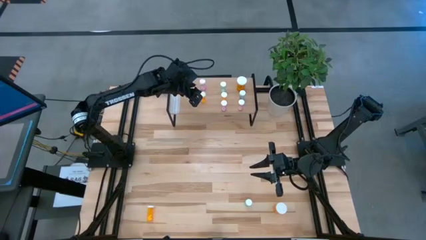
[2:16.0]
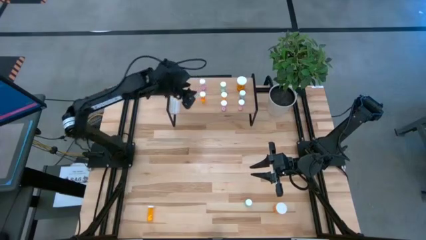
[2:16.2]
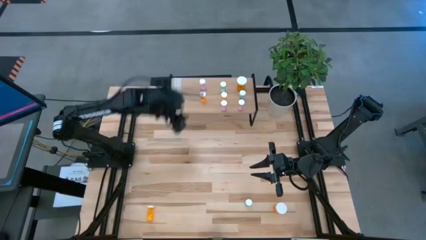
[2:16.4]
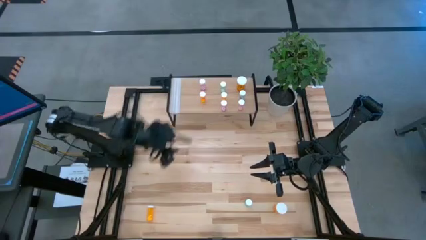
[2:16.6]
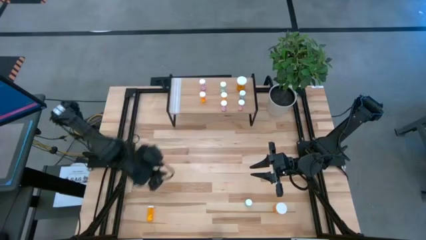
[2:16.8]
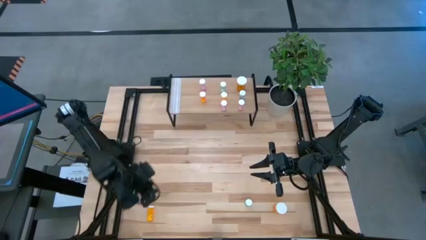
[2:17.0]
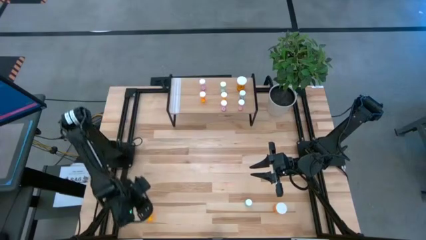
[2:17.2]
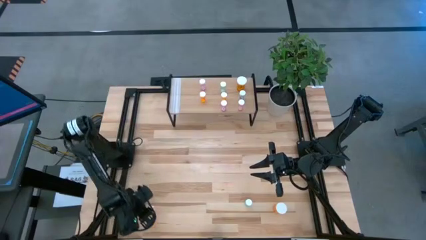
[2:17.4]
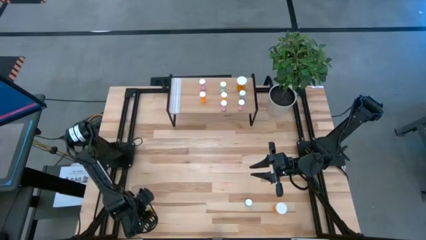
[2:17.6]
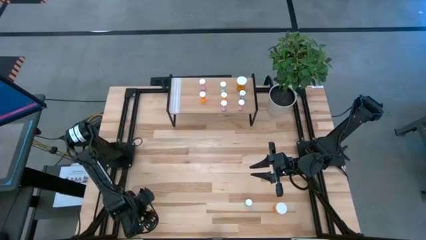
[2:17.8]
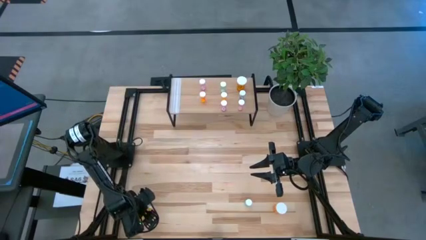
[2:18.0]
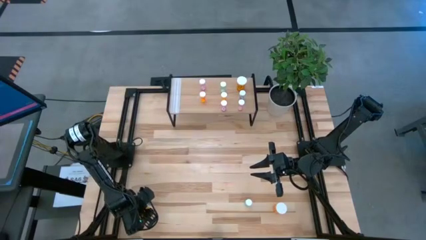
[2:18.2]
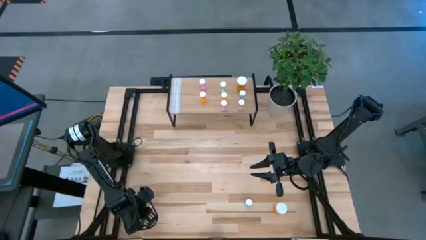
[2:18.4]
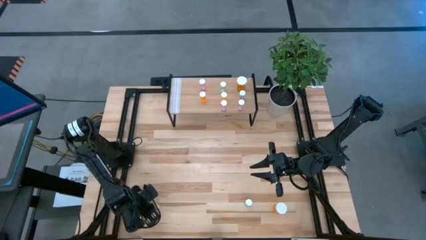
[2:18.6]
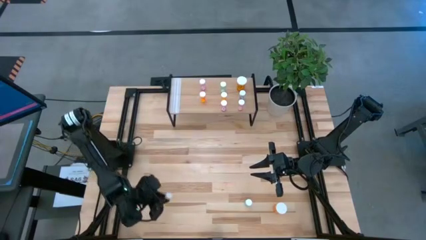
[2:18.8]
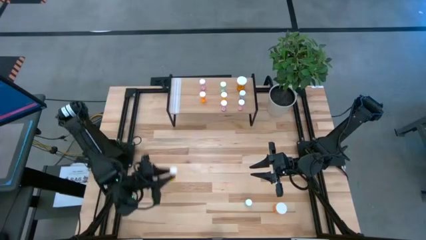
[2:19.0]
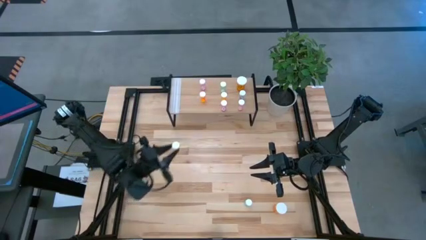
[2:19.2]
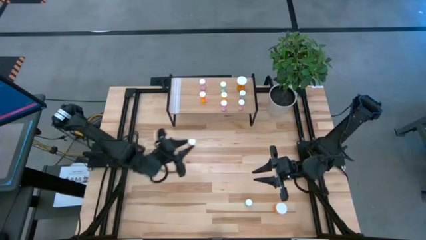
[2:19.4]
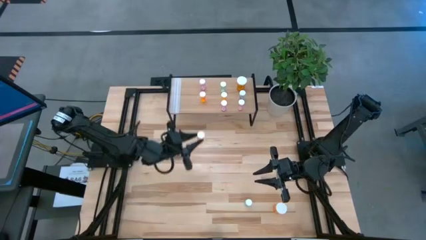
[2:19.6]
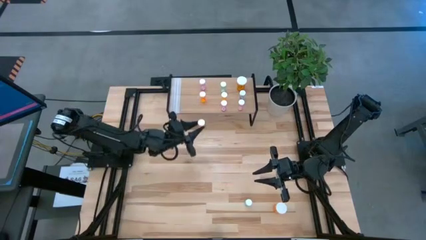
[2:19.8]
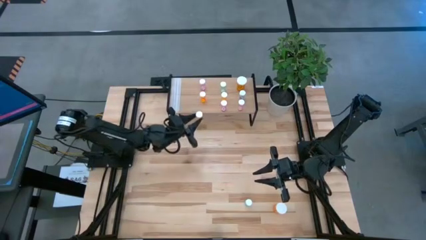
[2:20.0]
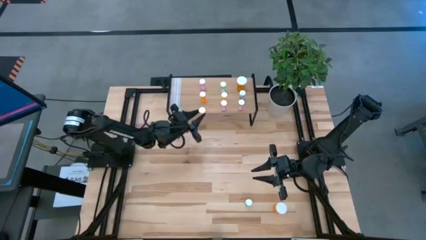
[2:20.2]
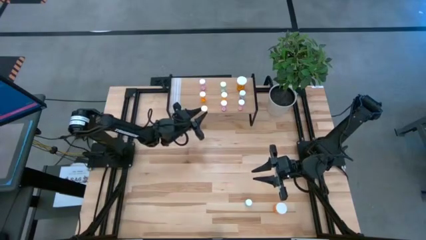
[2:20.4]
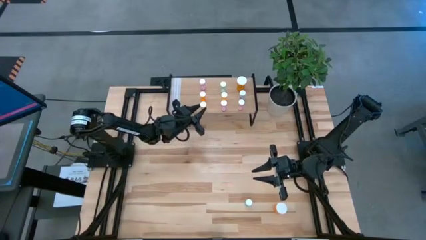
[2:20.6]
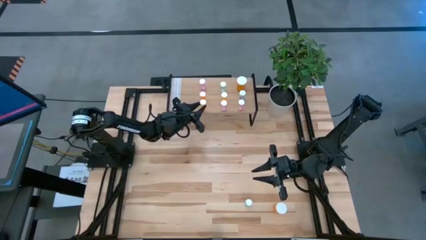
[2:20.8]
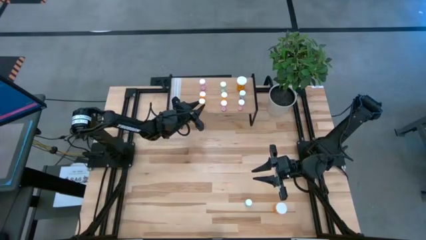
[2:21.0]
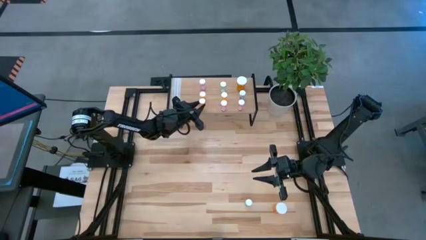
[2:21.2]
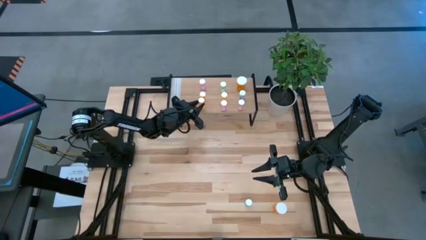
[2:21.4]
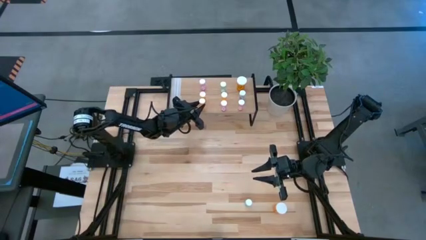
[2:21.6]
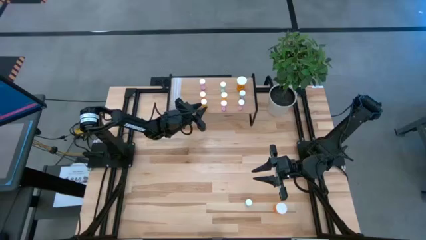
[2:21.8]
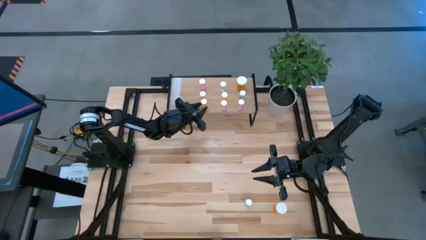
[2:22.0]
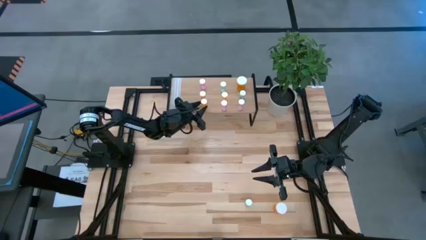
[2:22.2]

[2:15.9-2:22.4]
Task: Pick and place medicine bottles onto shelf by color
Put the small orange pill bottle on the shelf

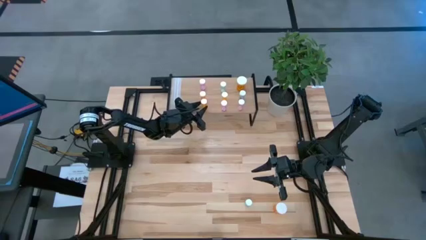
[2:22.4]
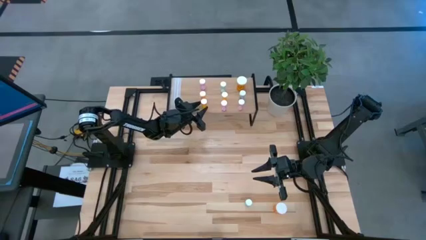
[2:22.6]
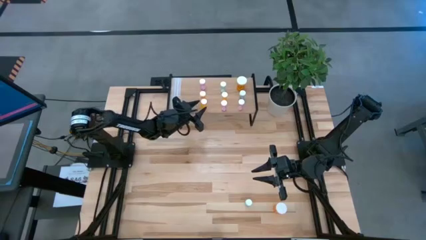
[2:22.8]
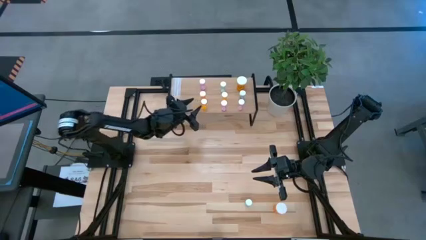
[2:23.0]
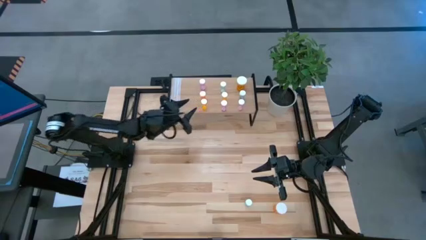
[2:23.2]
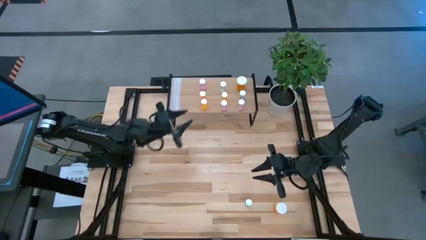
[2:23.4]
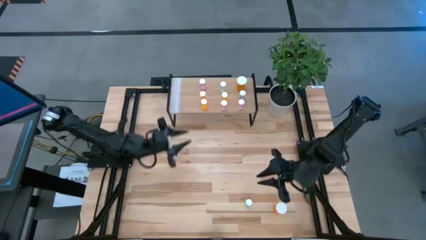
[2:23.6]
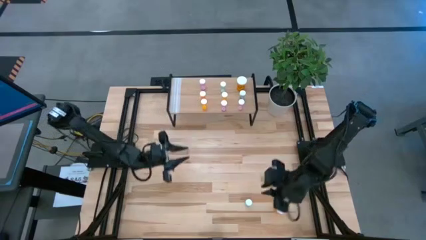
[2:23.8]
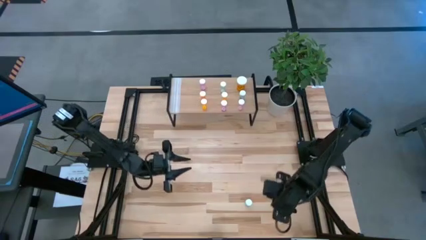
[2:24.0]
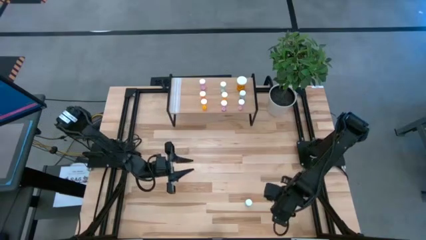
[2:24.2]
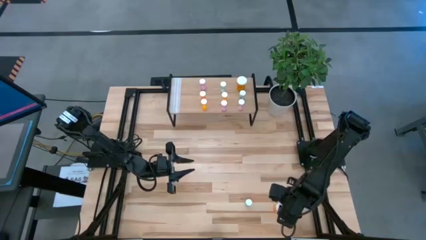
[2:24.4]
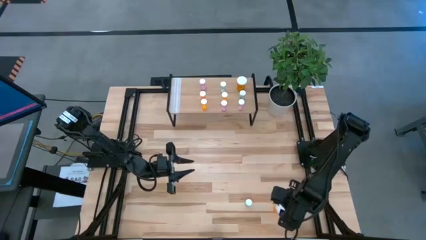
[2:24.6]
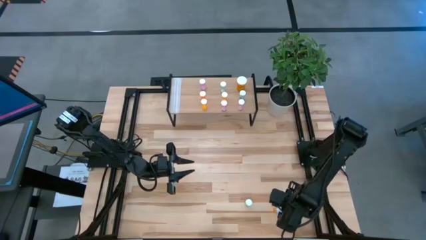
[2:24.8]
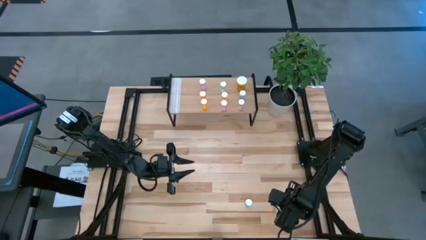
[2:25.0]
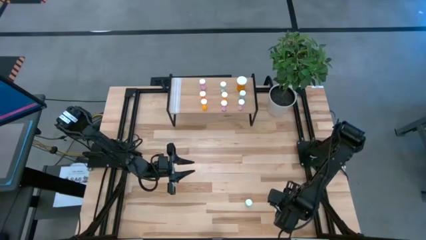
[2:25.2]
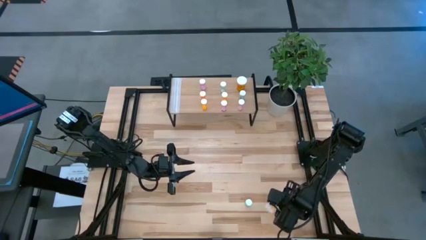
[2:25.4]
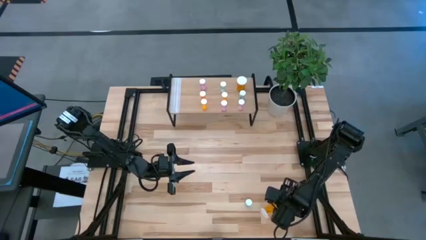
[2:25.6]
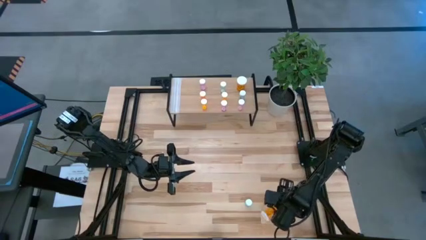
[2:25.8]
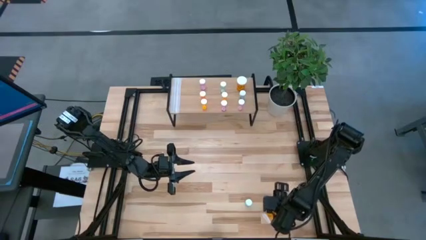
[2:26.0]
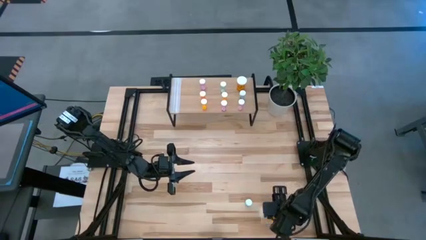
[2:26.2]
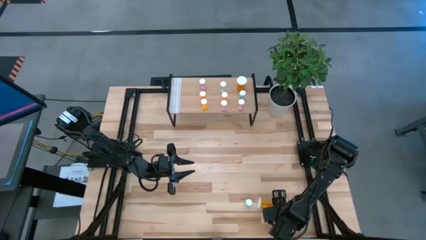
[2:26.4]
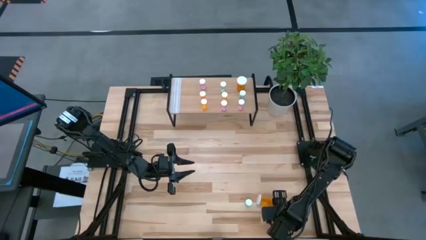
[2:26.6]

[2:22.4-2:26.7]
Put the large orange pill bottle on the shelf

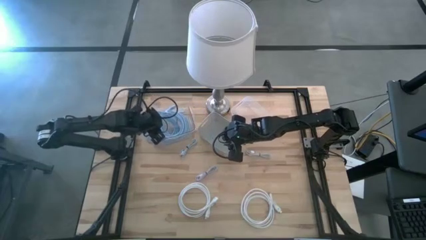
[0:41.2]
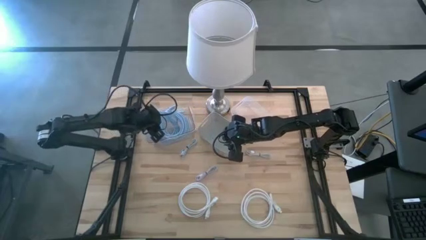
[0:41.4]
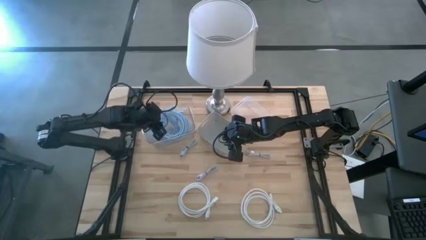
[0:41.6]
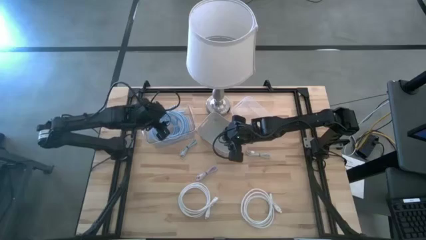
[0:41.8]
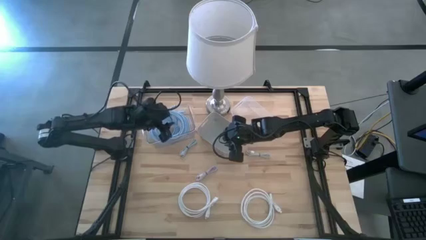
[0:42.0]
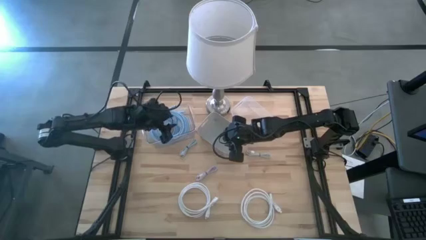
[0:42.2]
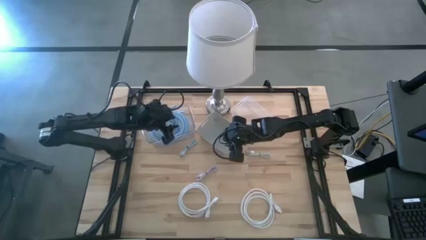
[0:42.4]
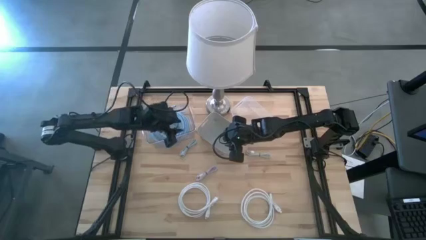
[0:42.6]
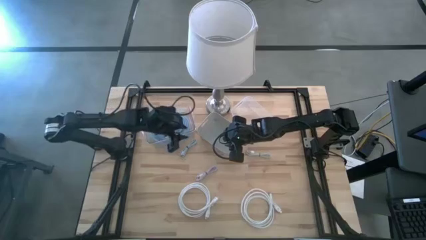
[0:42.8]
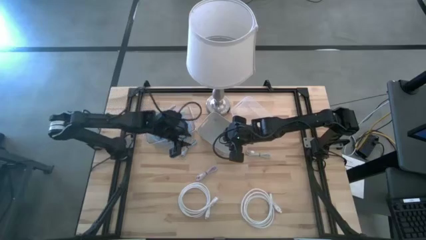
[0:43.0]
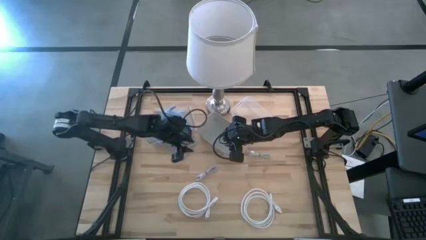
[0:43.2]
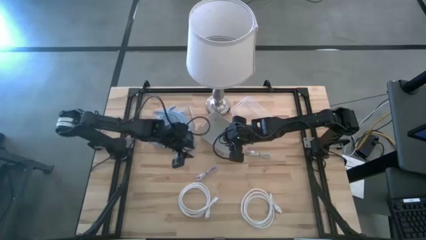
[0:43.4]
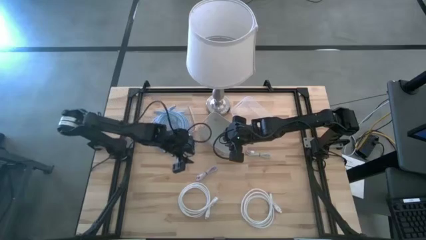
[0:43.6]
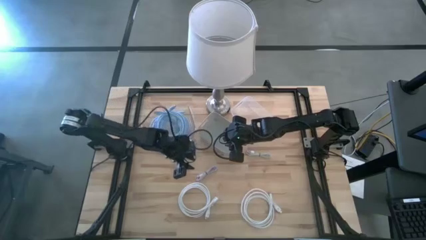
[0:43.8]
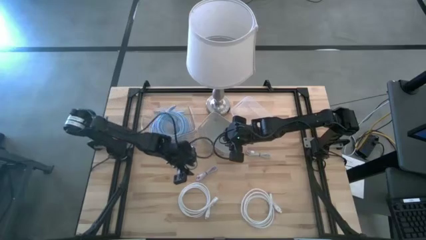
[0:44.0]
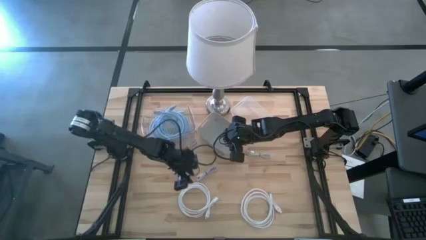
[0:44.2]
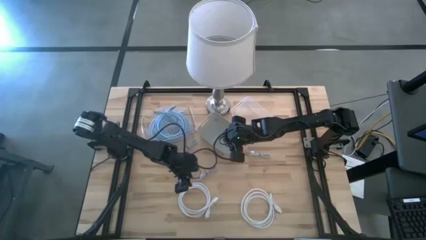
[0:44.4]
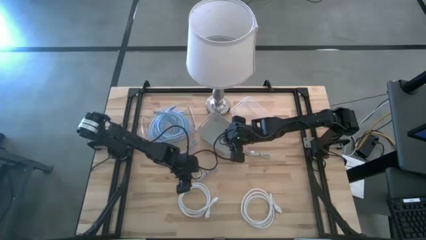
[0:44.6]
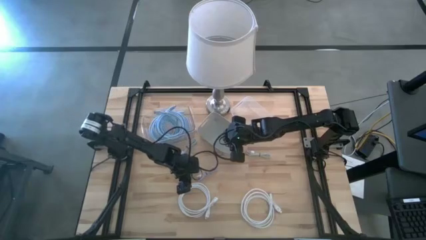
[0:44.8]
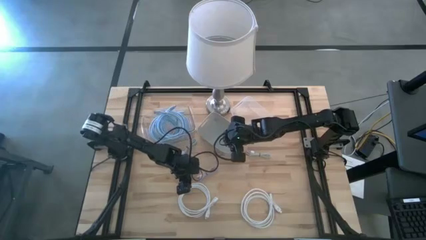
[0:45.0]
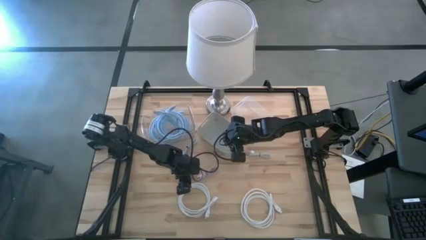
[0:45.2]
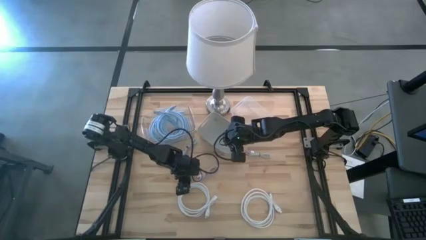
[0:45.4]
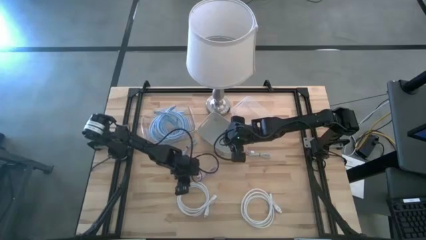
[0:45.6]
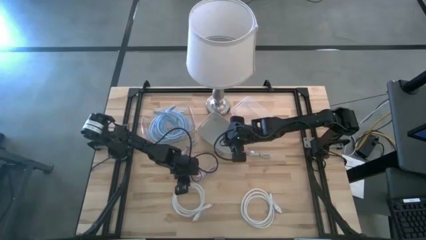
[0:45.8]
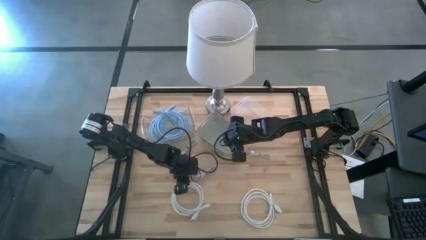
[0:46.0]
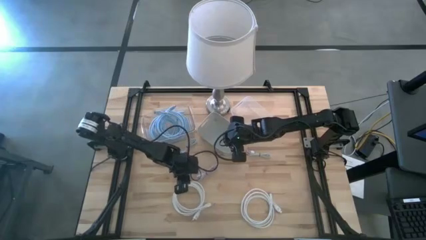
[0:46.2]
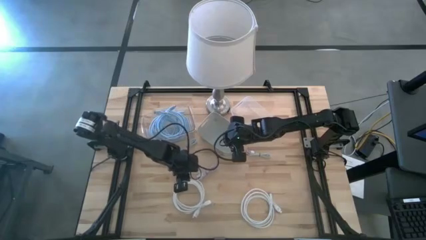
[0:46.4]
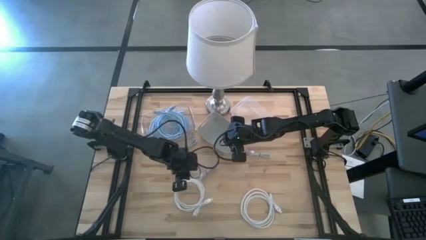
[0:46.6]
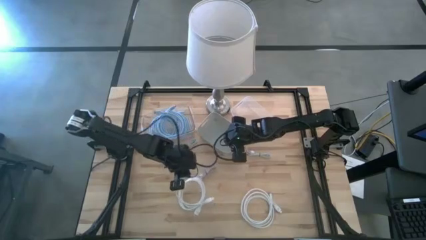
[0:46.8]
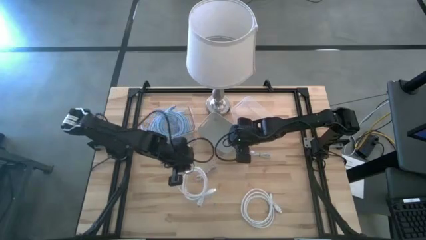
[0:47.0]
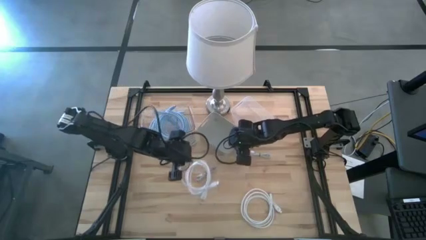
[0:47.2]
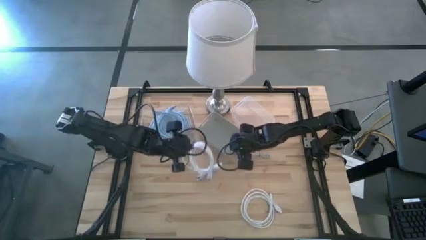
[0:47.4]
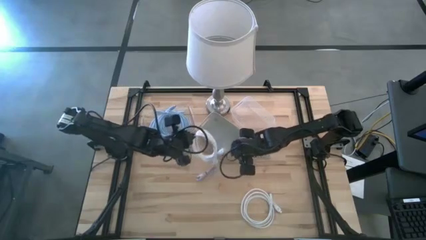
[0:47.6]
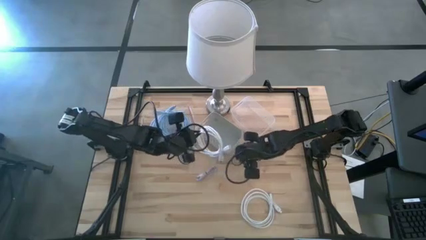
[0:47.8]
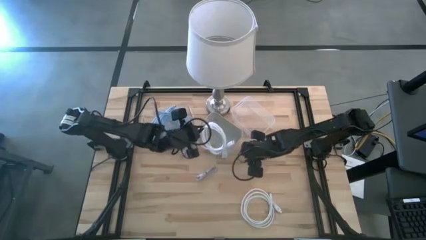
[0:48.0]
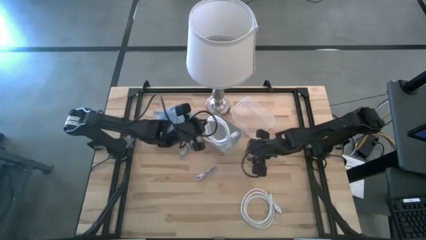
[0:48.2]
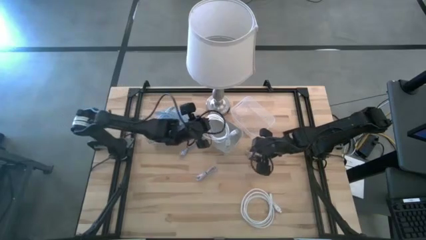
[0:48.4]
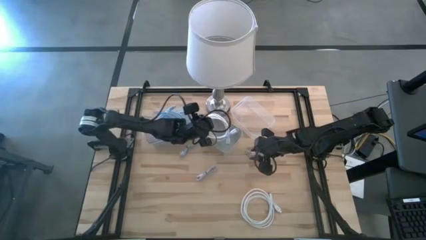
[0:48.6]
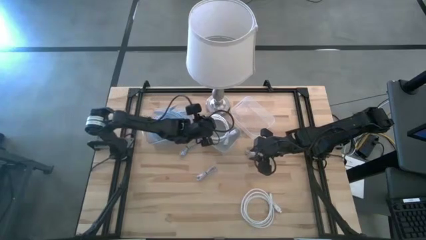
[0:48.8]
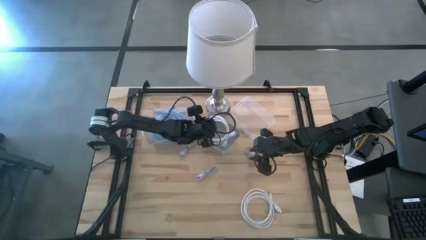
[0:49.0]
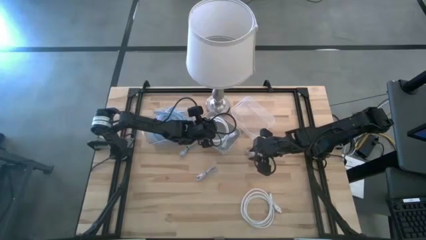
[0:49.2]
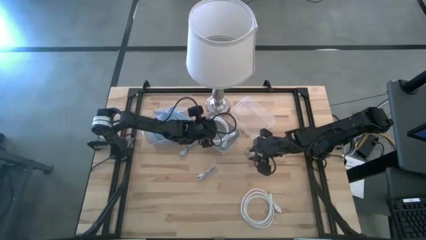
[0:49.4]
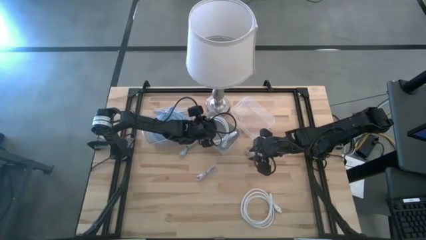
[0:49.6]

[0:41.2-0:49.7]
Task: Pick & Place USB Port
Put the left white HDMI cable into the gray bin
